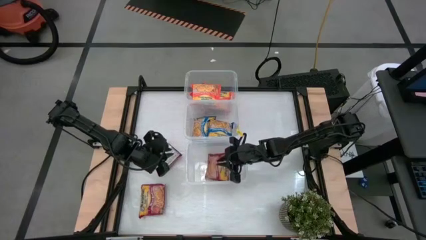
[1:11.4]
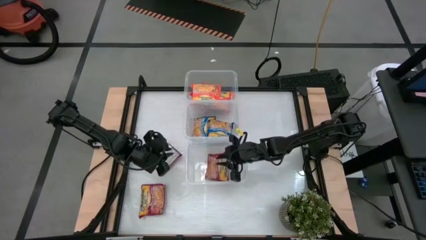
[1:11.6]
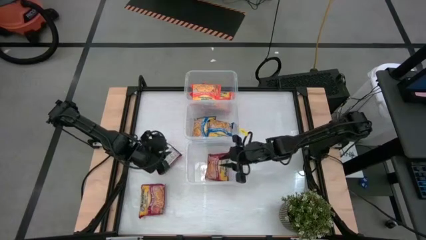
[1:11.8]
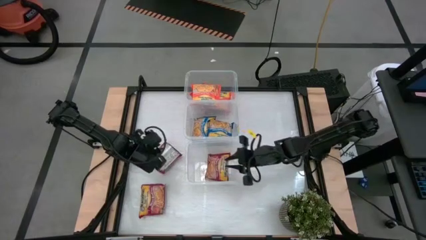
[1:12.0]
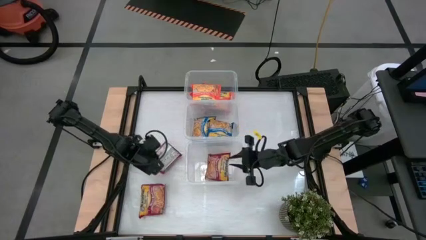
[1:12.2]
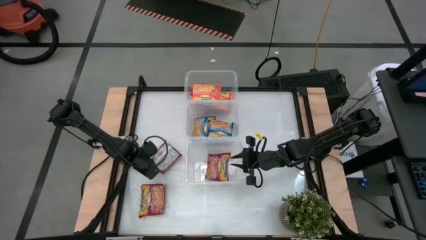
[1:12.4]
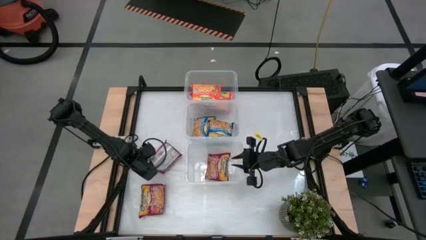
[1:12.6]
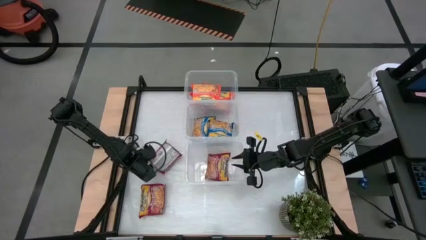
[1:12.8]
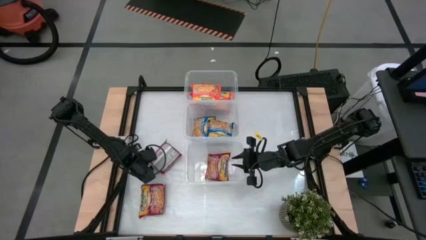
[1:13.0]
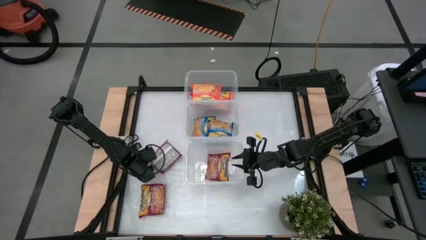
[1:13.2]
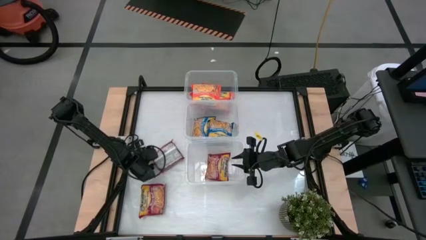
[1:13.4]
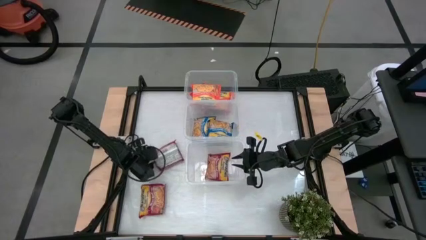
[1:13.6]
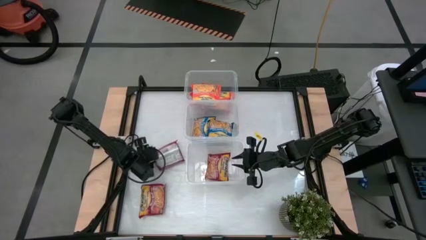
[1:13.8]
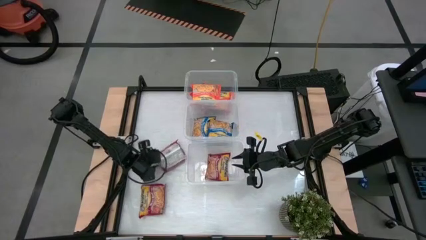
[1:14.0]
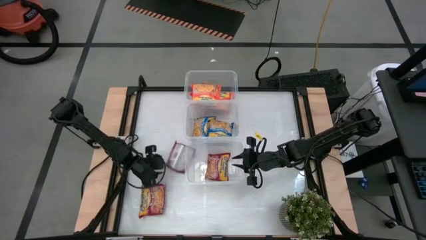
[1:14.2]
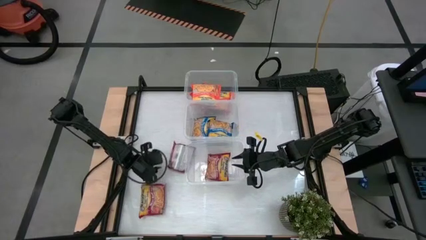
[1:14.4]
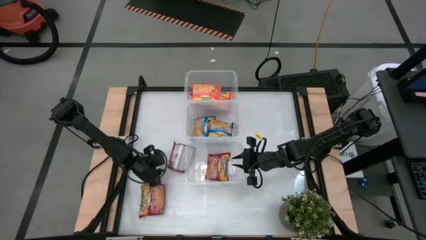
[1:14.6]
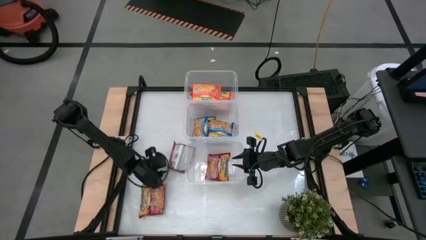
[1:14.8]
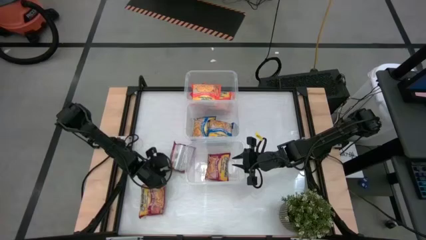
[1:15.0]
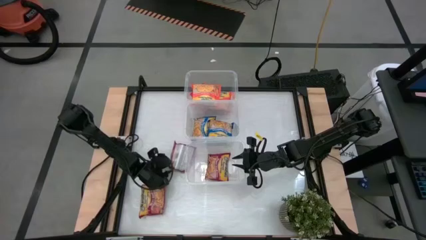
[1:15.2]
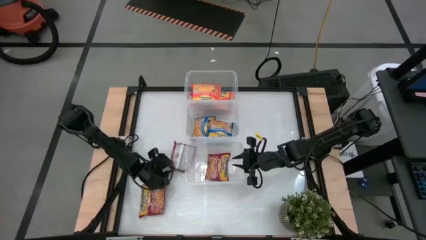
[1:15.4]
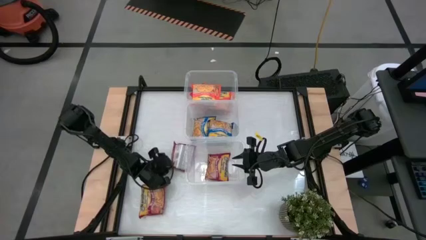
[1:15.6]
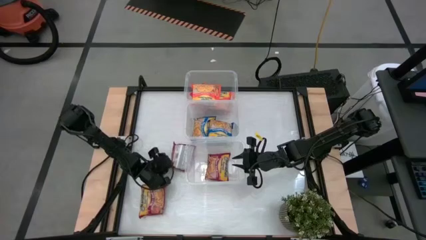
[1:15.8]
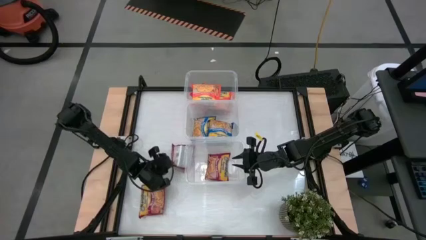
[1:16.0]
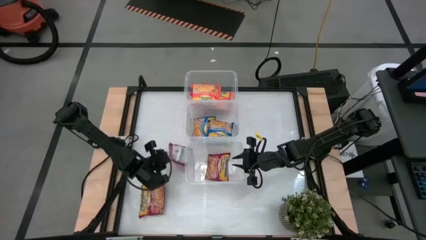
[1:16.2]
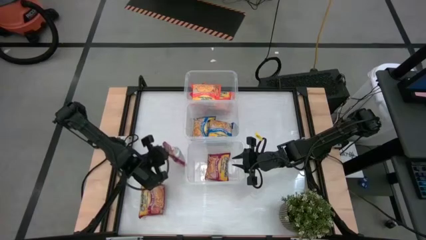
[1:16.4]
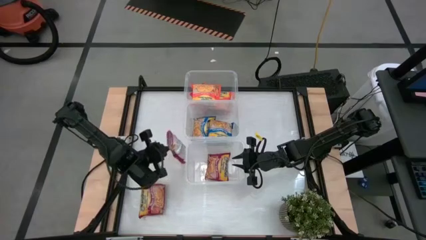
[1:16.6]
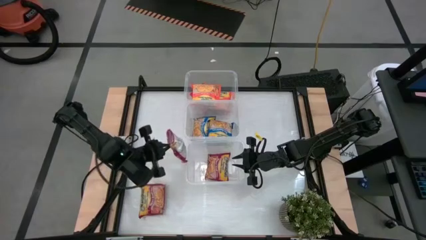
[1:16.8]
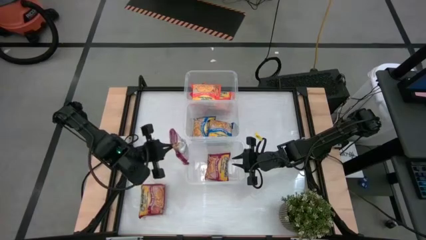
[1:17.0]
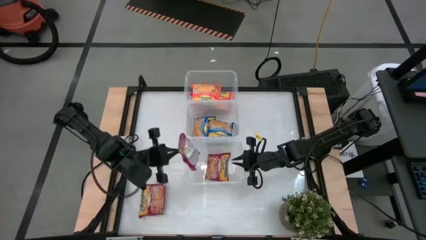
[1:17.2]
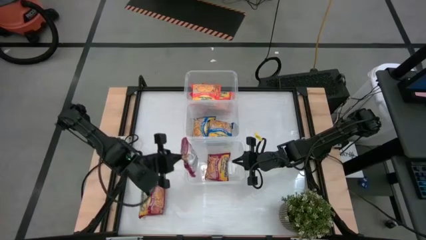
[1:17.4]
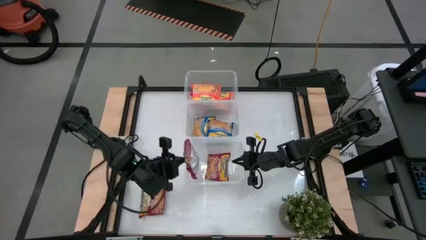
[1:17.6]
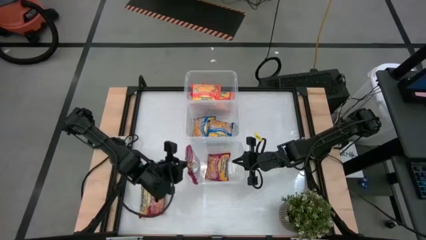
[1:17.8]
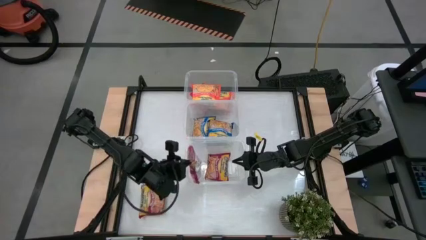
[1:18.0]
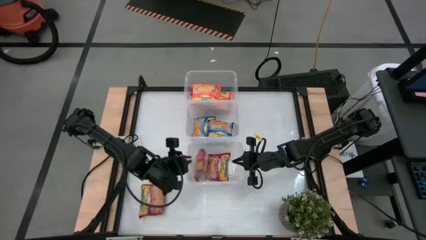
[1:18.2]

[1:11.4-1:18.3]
Task: Sort Maruchan noodles
Put the top red noodle pack into the bottom transparent bin

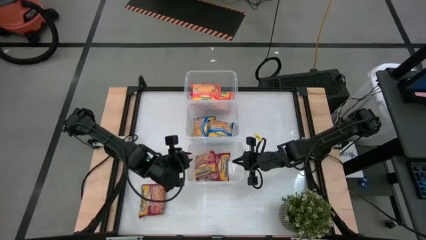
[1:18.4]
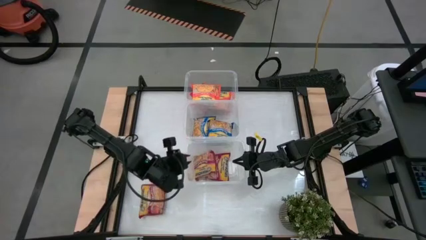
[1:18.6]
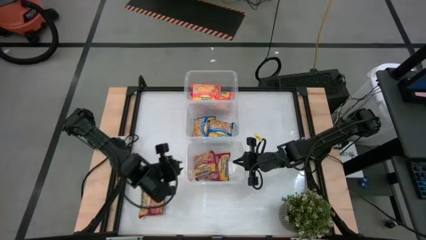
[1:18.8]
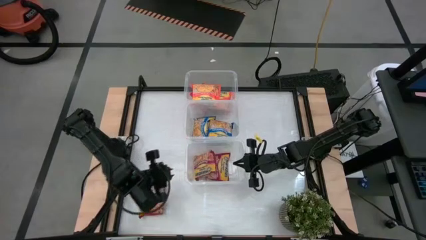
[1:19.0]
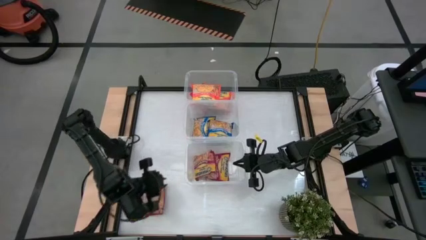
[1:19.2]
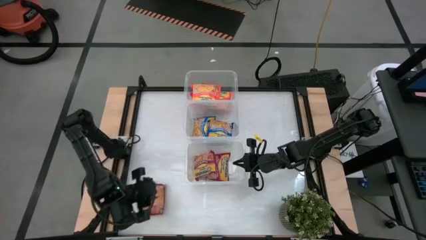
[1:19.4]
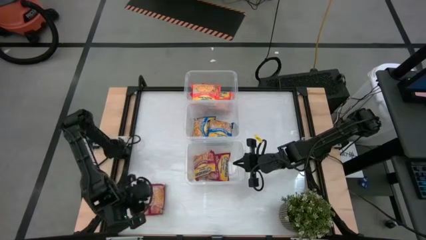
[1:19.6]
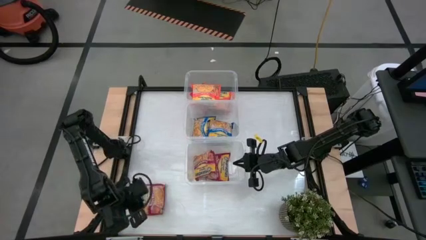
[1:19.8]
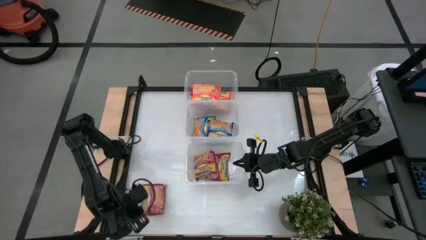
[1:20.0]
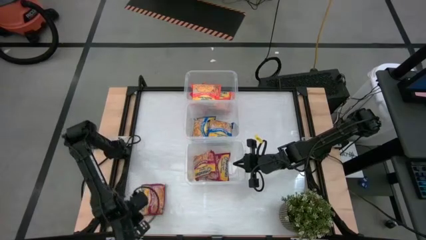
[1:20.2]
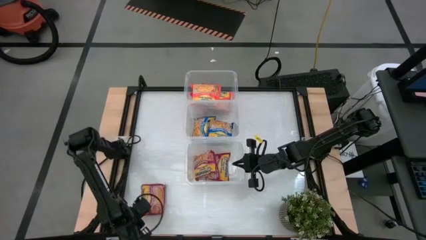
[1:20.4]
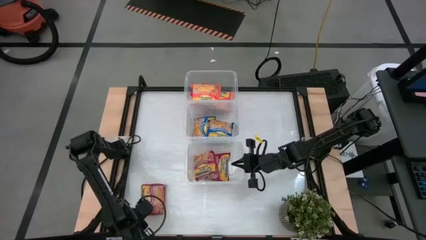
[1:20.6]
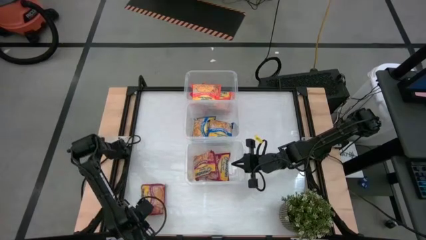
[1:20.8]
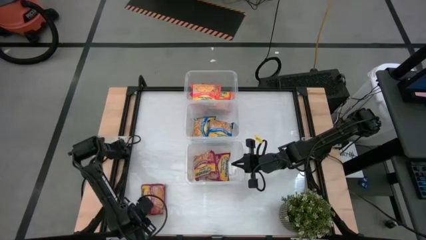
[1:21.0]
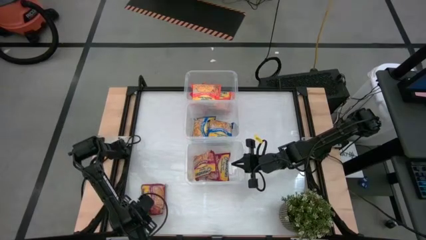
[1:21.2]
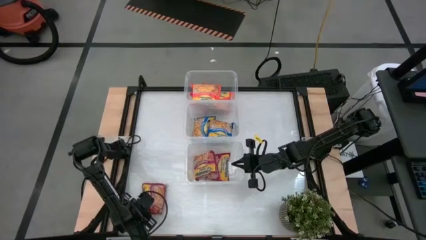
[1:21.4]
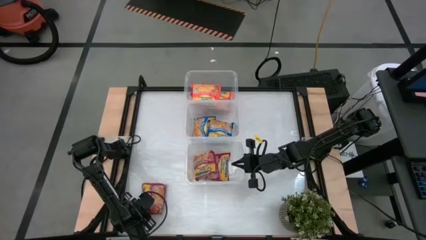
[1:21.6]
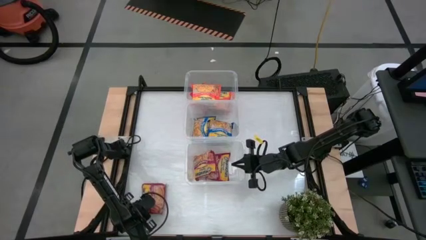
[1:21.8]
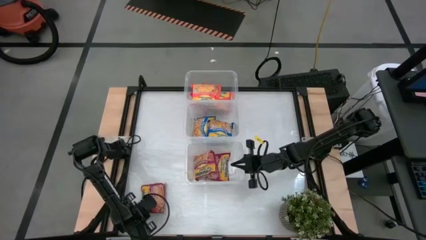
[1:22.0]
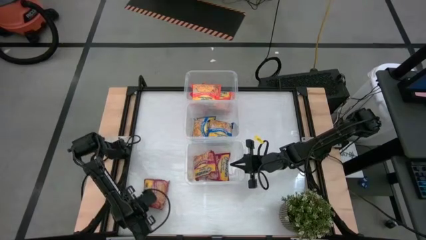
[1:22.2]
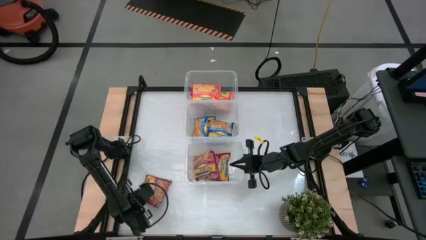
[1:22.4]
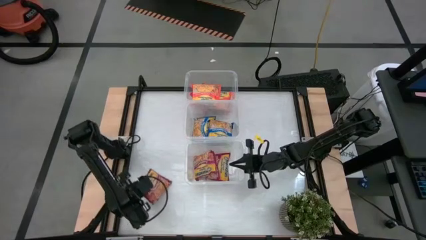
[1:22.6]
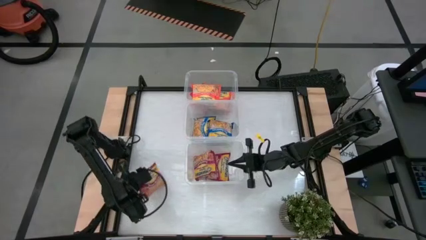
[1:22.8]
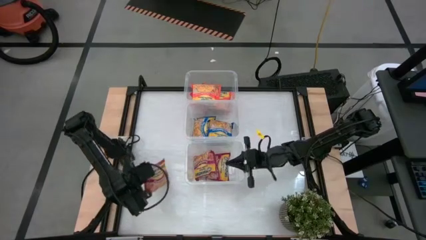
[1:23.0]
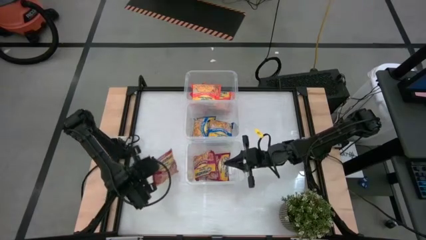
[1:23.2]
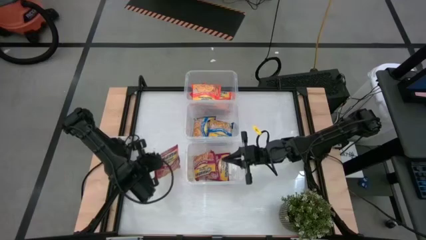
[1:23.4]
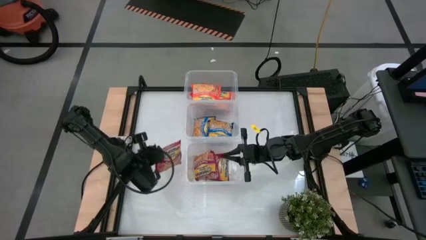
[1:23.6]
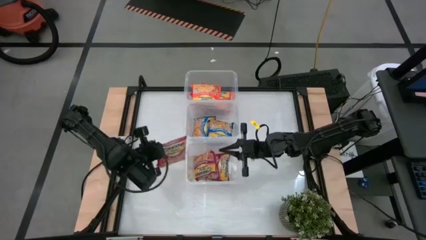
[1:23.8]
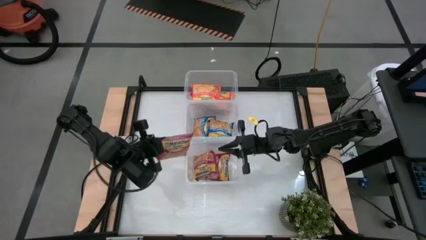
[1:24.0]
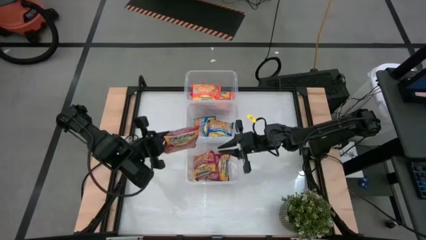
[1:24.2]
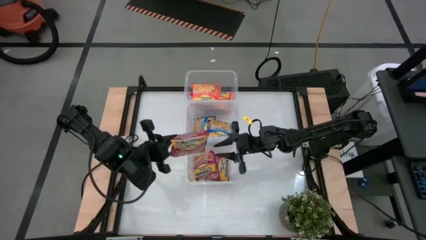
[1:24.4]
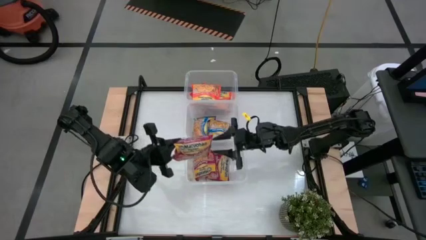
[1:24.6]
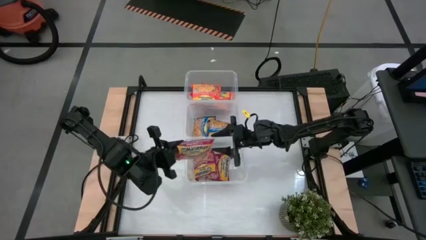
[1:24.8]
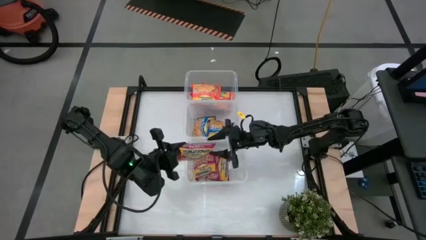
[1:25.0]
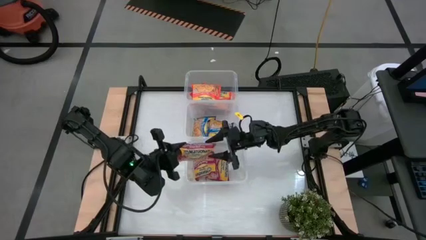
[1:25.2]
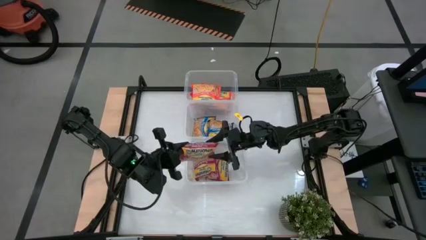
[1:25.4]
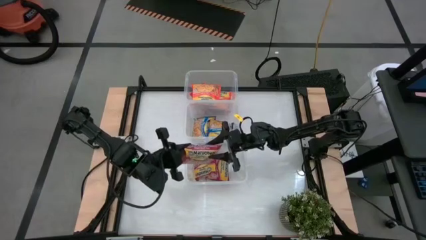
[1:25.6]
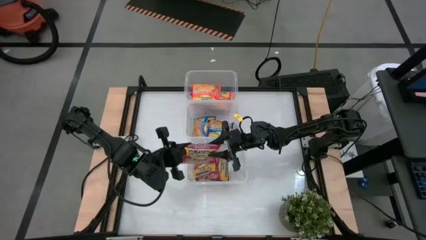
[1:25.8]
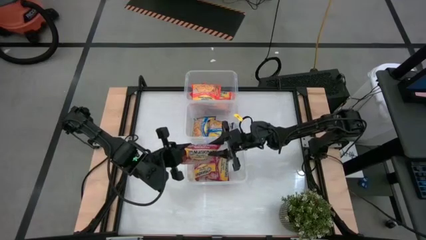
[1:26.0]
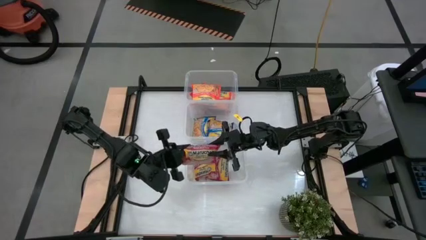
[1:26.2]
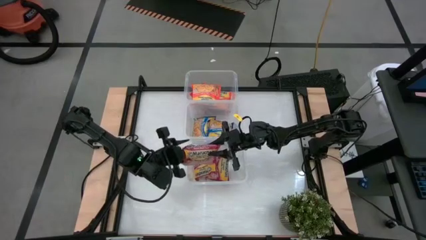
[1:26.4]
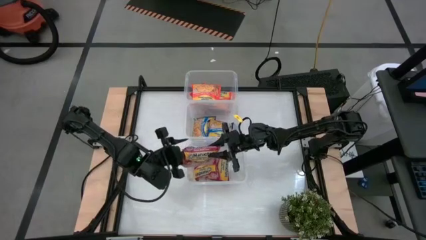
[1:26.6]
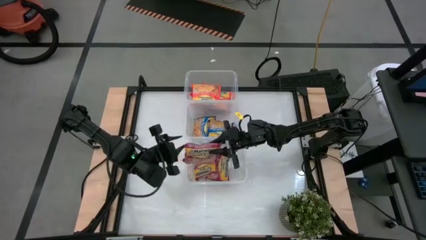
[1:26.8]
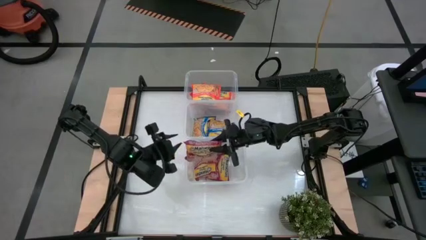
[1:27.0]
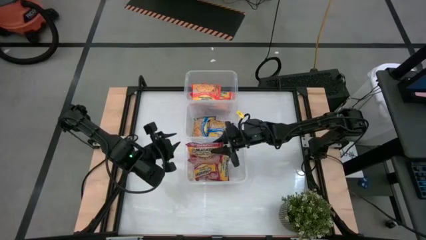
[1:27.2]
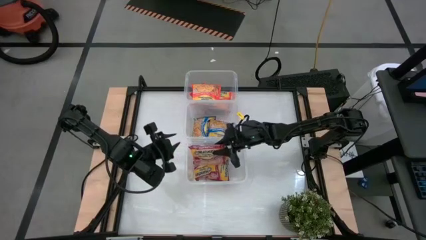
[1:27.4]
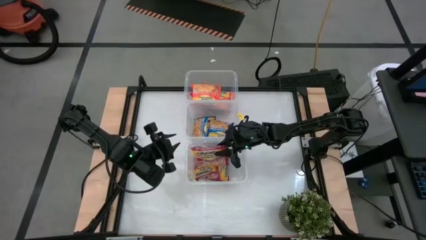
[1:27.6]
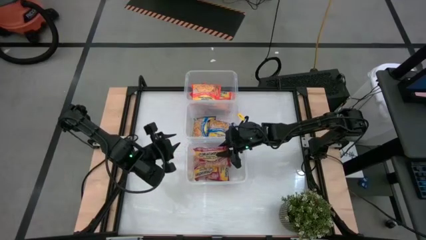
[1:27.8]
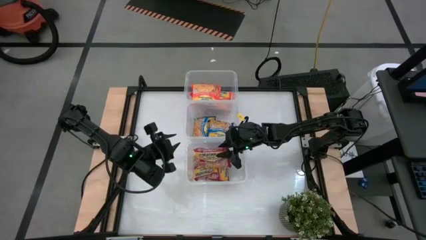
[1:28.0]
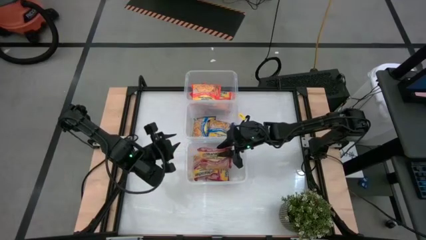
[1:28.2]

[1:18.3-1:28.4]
Put the red noodle pack into the bottom transparent bin

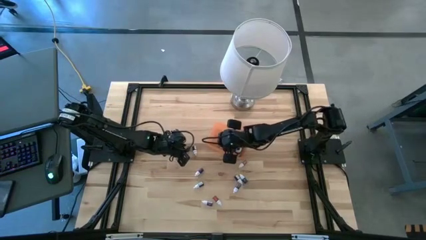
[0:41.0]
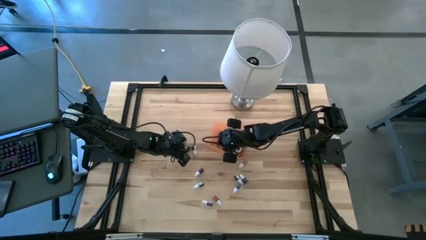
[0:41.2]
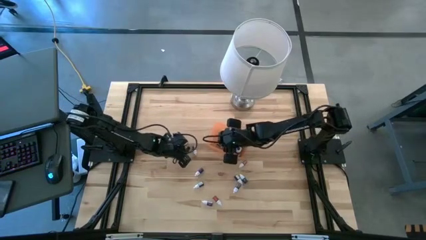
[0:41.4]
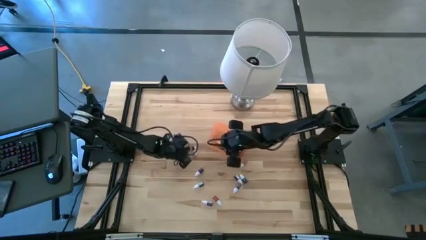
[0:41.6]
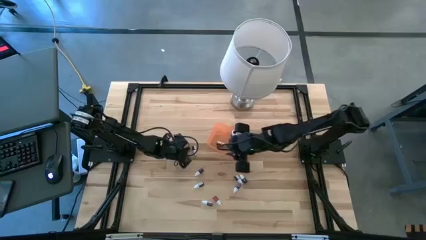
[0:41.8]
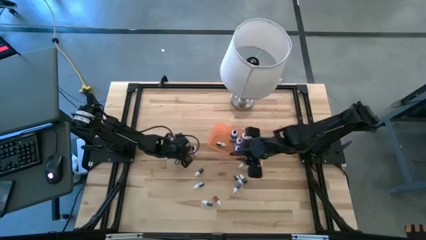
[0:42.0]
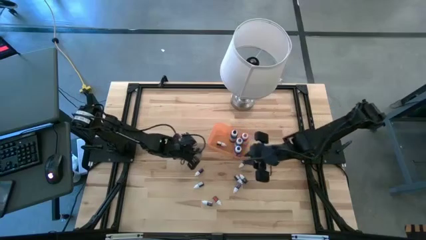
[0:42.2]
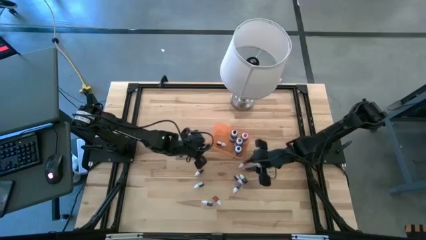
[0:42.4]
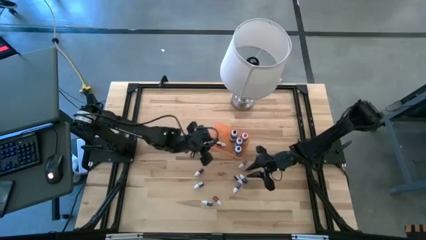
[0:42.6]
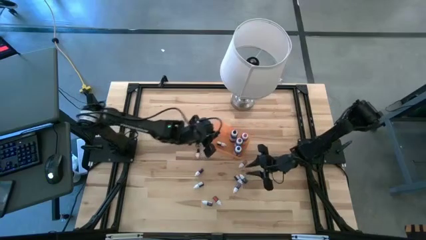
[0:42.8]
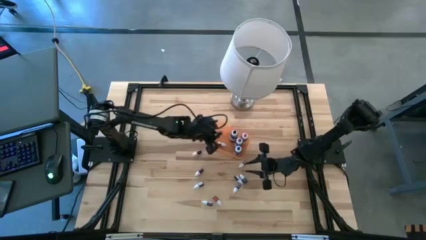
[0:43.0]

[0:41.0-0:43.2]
Task: Pick & Place food coloring
Put the small black food coloring bottle into the orange bin
